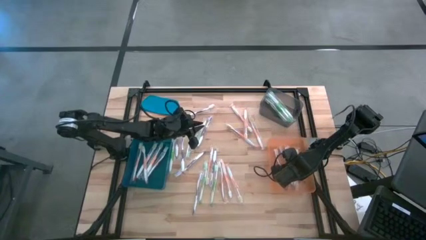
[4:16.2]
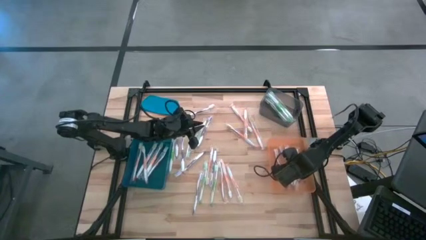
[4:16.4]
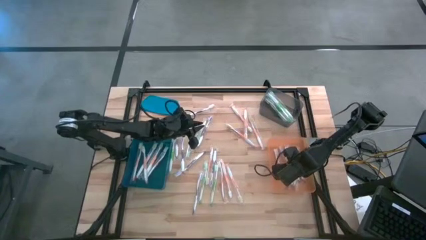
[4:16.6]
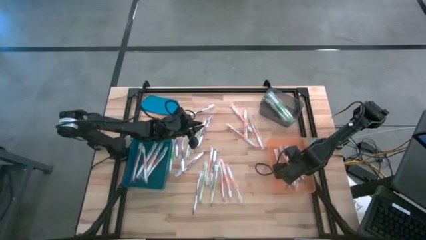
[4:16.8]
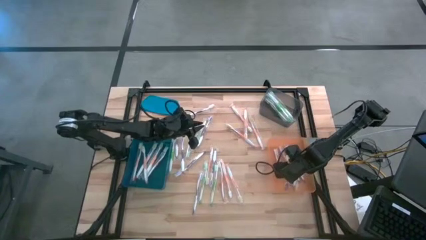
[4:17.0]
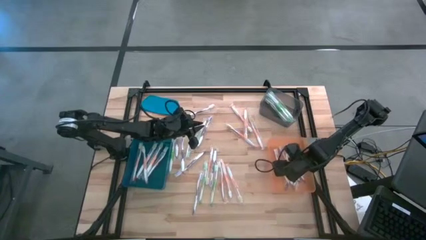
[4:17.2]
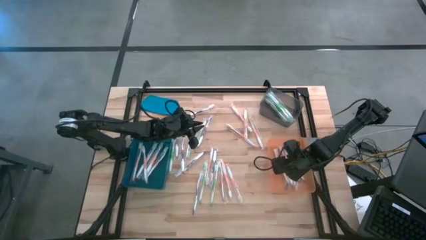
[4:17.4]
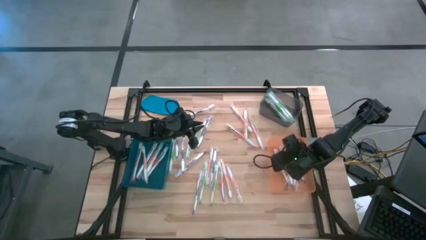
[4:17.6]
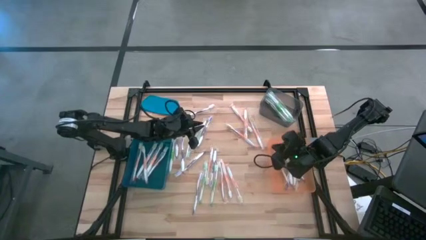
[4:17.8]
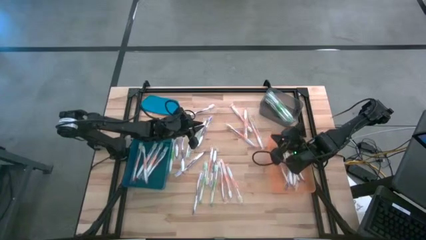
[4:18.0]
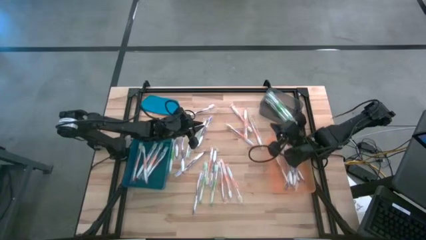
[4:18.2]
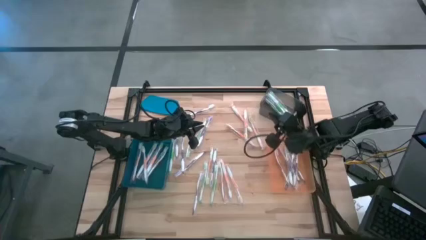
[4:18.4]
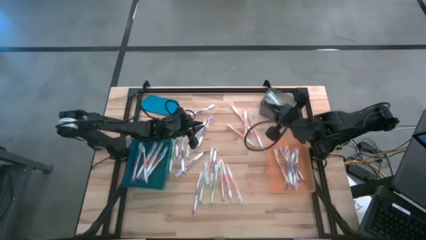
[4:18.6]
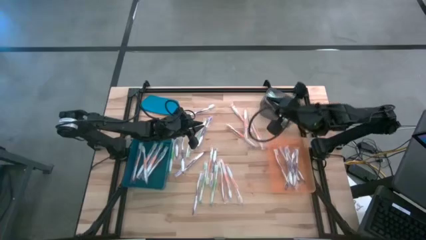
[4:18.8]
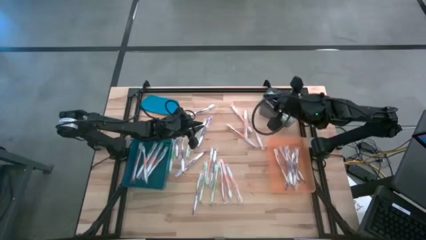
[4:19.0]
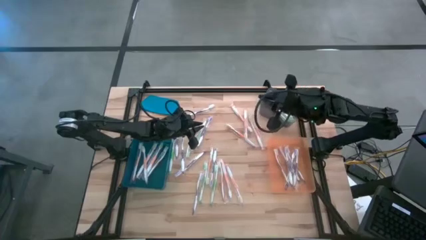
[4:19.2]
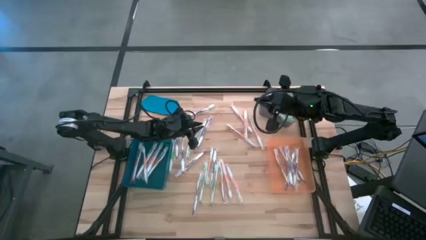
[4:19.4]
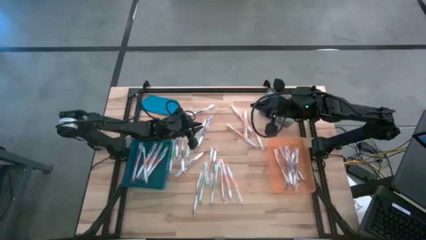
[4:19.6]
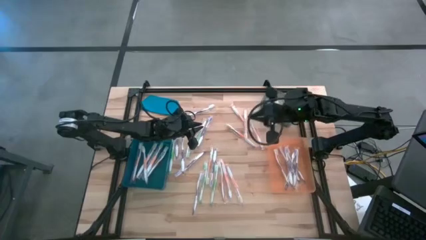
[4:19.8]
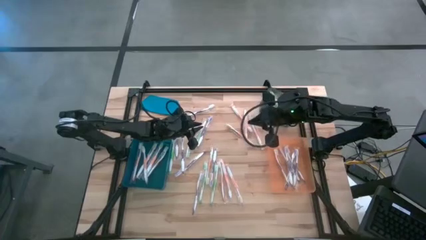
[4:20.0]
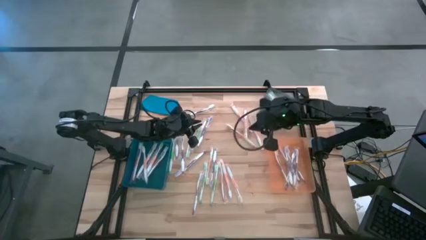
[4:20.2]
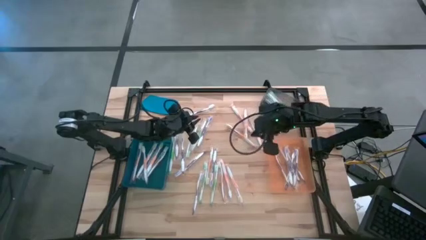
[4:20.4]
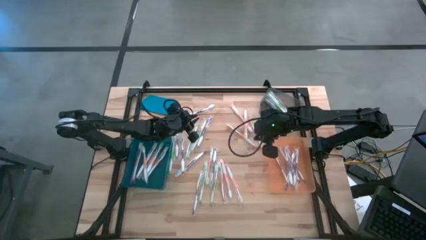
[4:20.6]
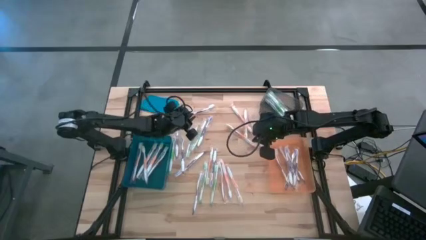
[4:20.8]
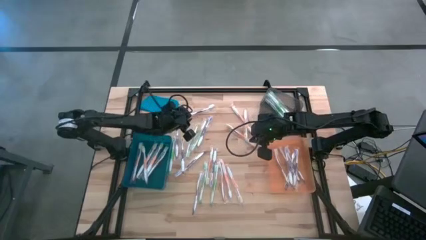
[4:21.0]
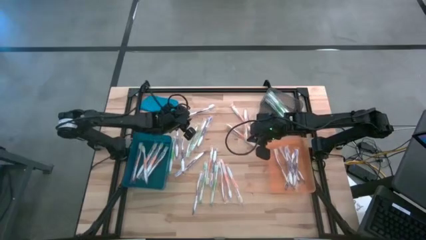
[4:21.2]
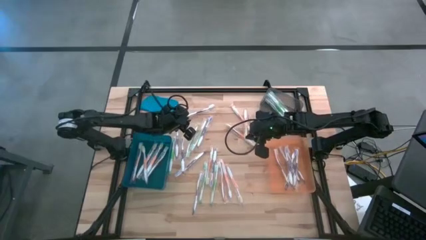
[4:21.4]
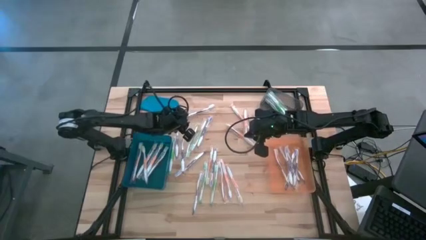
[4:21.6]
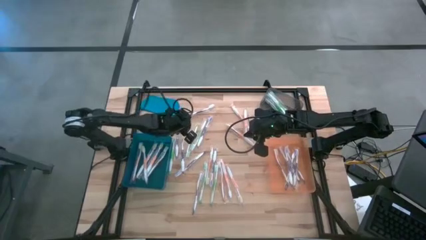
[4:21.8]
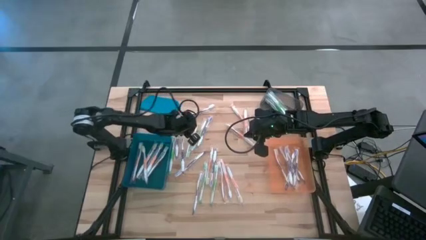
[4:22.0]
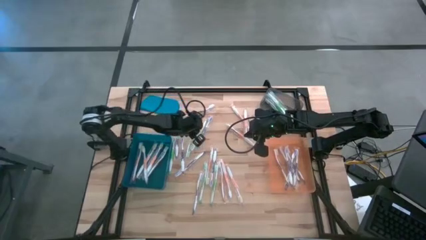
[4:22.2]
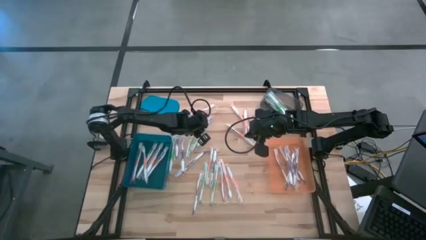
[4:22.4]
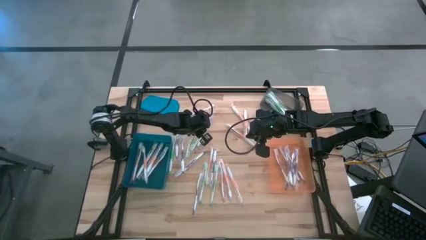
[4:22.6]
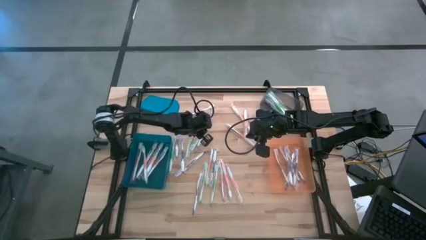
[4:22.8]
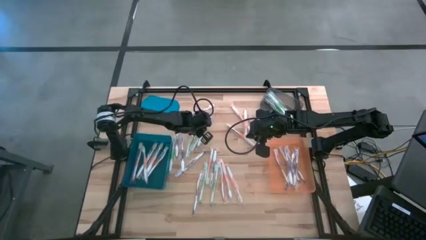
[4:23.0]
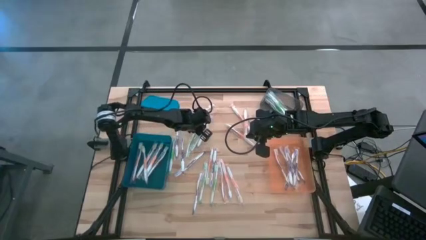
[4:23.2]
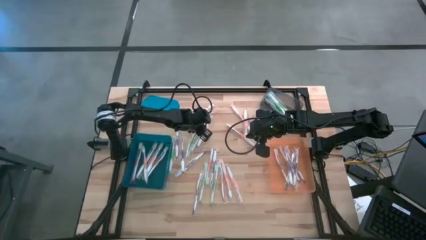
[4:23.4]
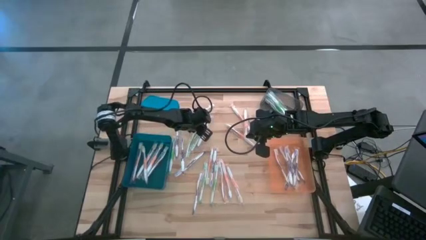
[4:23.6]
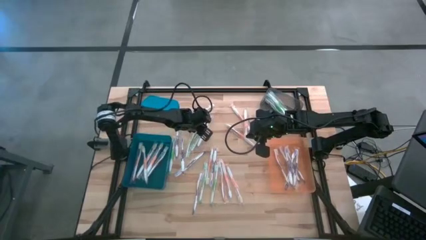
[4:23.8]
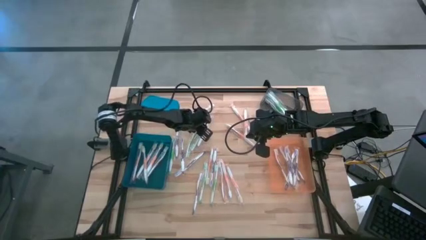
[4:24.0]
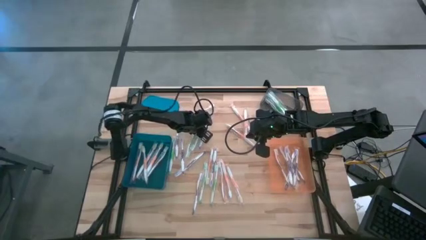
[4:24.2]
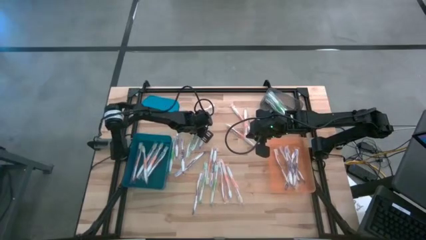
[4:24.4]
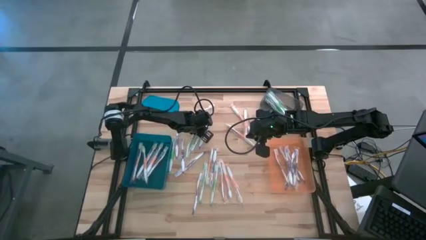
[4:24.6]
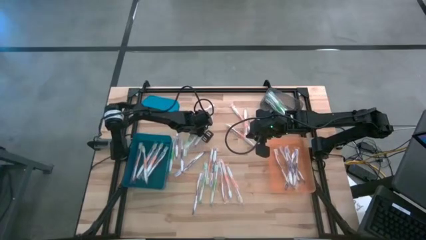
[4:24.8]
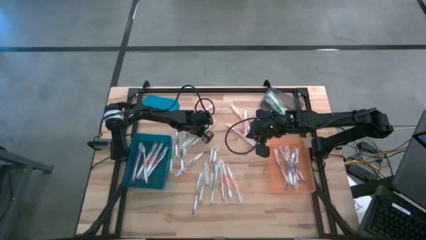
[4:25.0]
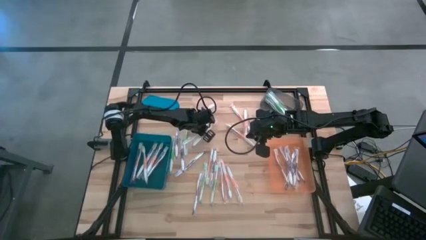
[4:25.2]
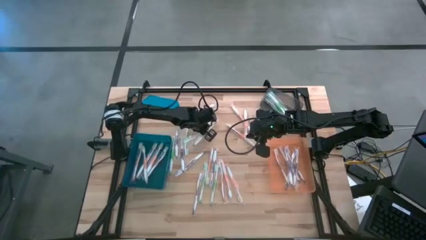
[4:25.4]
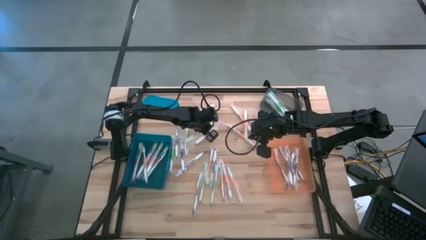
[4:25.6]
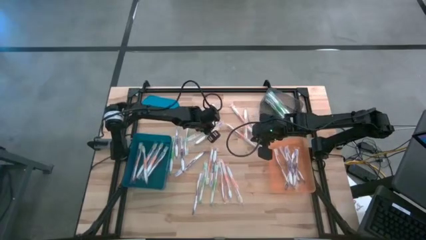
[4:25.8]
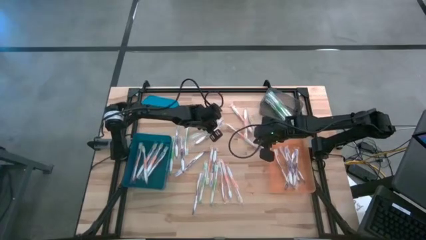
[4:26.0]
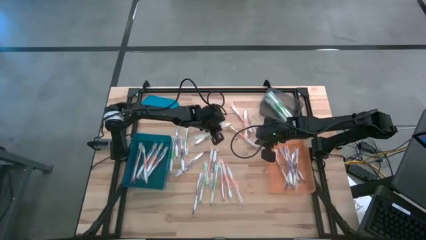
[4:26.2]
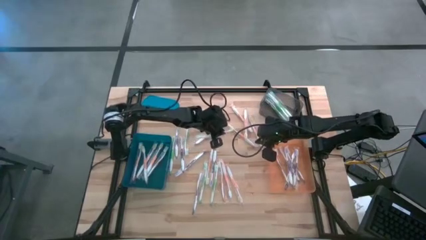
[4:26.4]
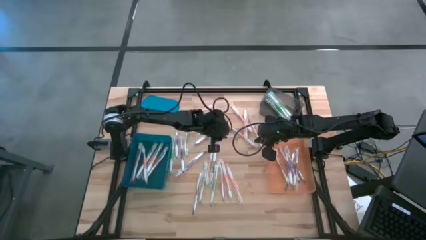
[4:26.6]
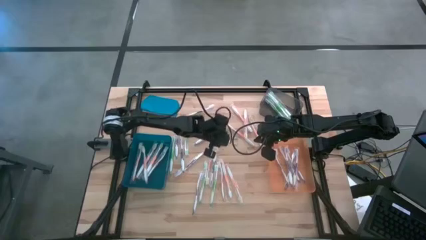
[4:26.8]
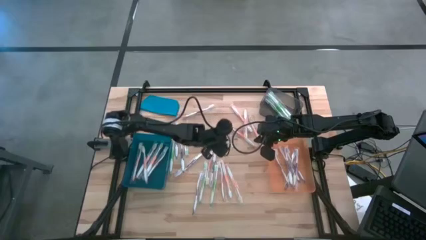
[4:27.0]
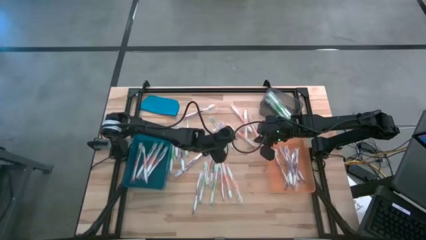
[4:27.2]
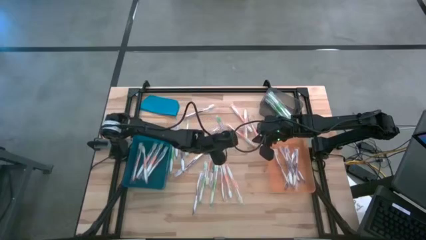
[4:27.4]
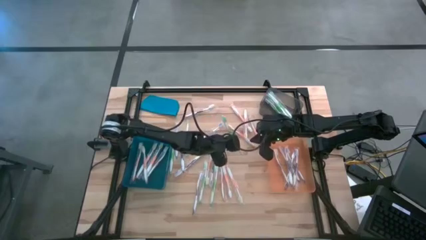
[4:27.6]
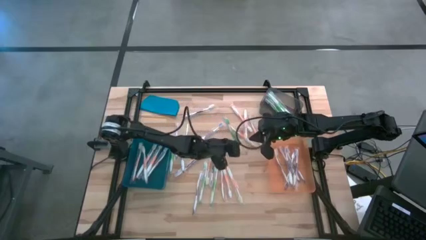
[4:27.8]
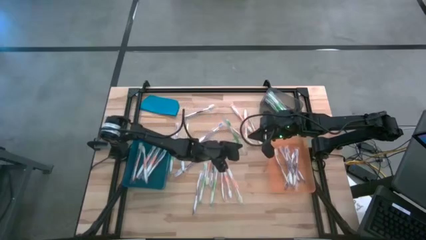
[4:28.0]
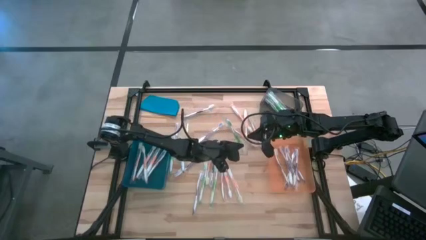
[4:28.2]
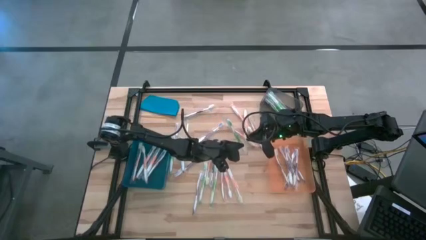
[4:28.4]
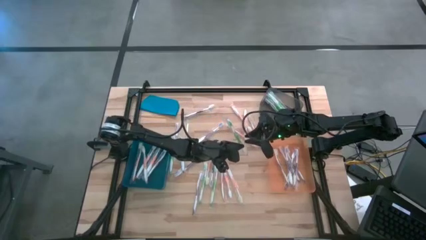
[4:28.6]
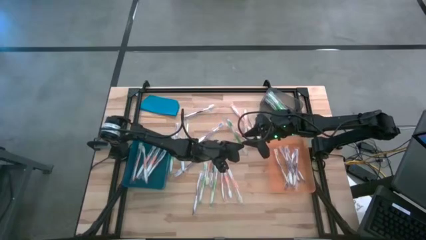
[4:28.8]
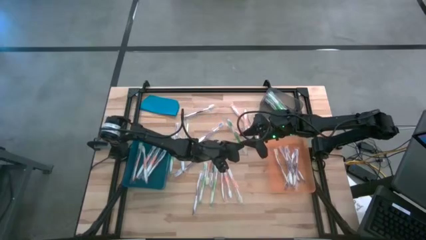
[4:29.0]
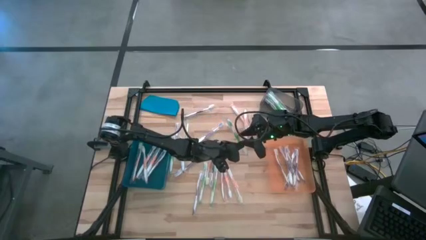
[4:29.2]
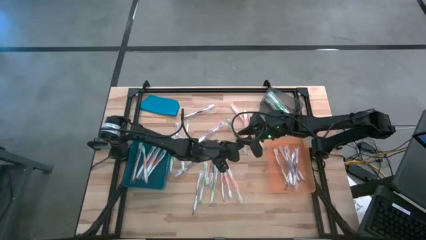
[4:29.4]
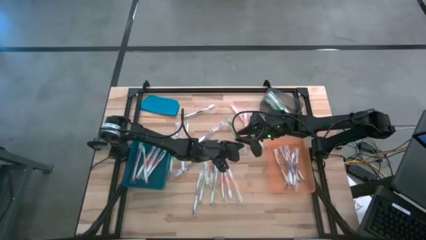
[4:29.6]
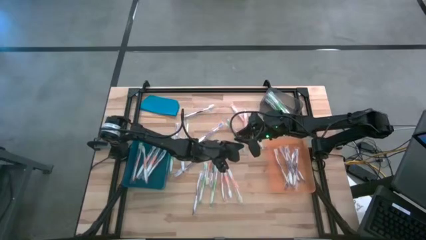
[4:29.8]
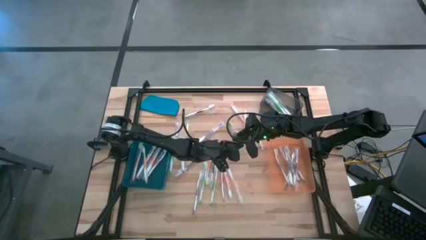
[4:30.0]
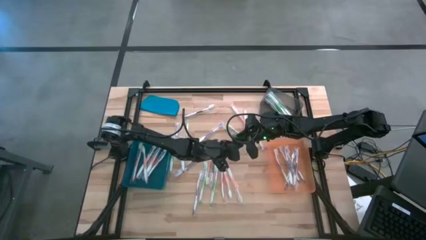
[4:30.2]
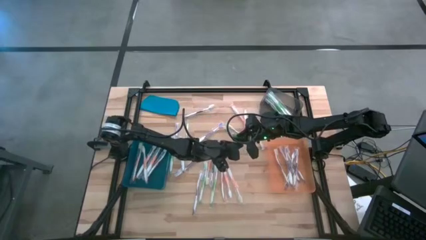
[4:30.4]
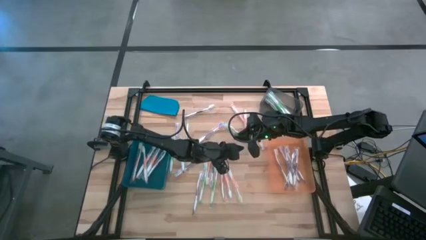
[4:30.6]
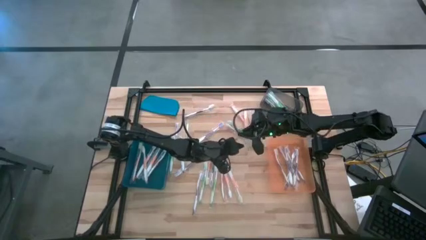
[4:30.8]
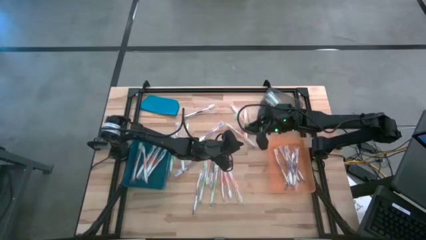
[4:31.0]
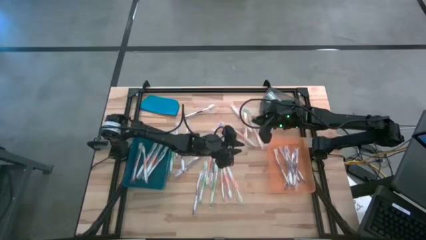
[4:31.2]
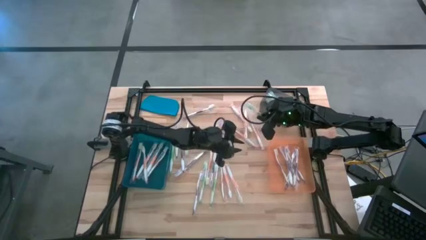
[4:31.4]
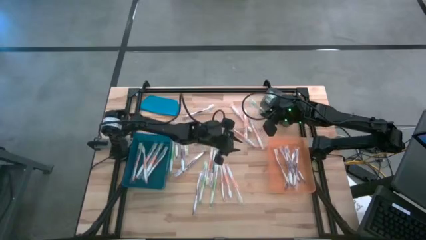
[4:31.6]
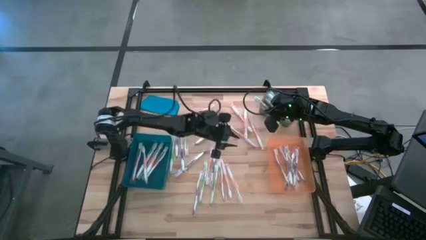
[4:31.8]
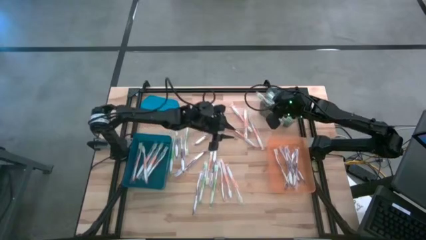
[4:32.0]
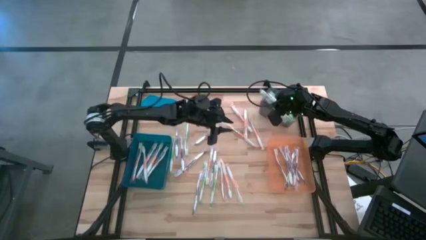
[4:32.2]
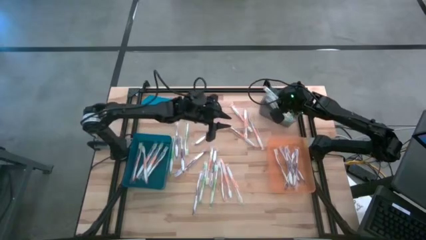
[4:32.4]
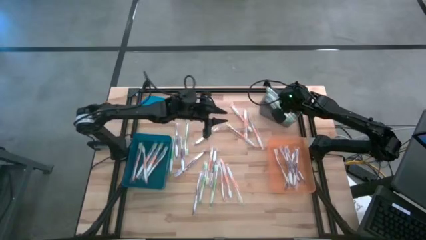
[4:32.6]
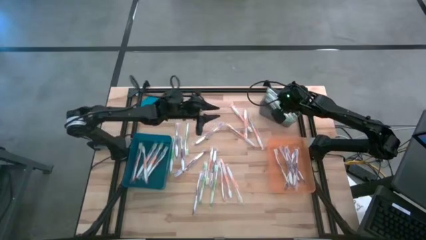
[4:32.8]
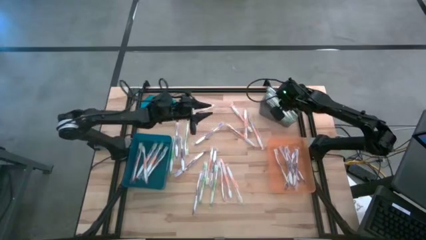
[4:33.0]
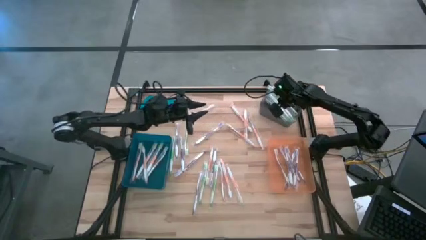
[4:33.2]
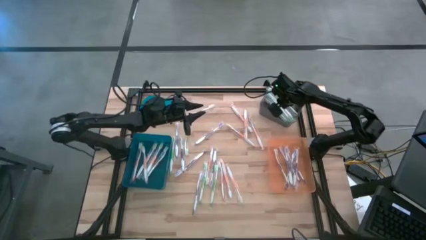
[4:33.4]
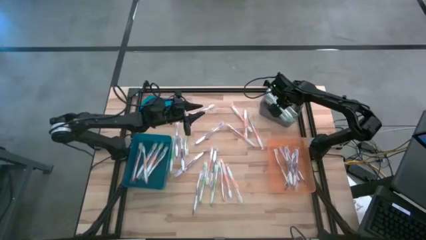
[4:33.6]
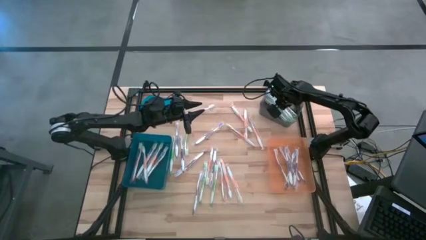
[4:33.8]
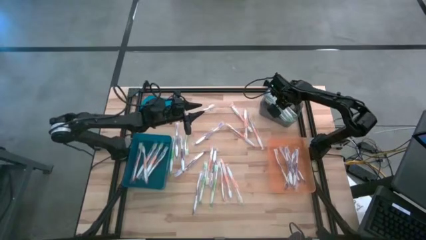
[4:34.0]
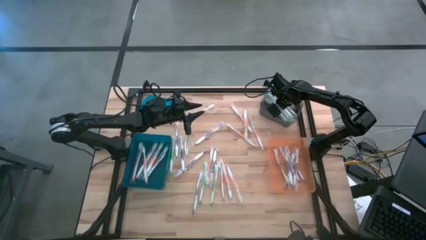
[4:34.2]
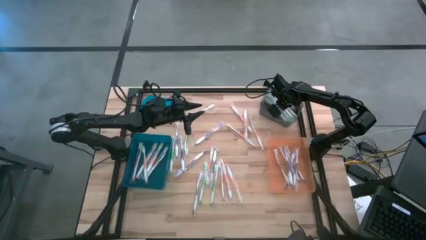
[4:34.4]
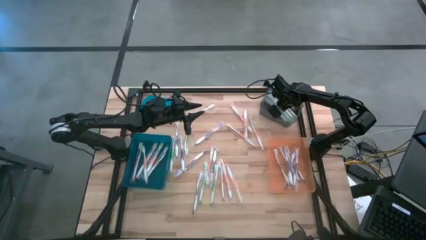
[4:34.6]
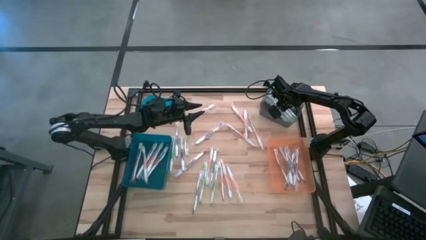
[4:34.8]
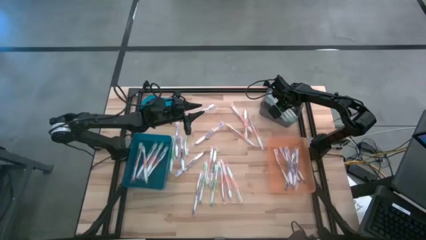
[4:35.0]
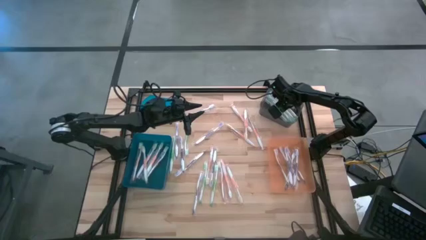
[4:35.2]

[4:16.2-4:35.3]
Task: Pick & Place Toothbrushes
Put the green toothbrush into the black bin
